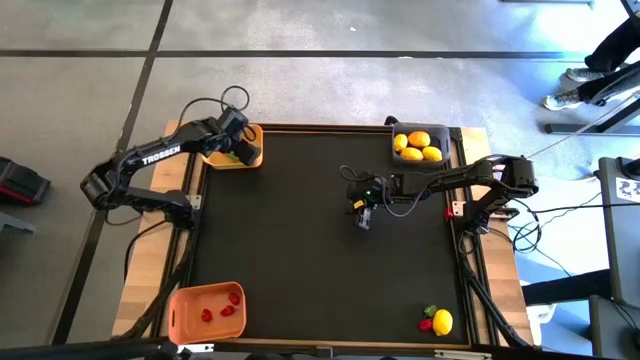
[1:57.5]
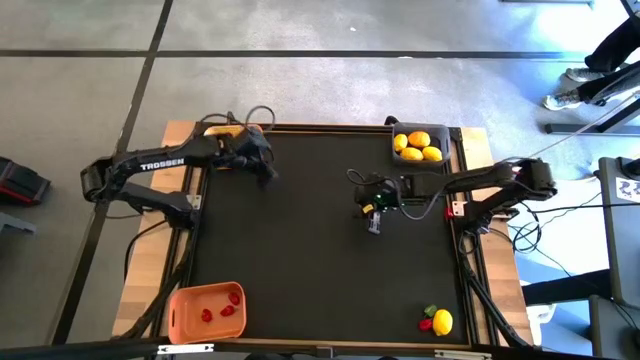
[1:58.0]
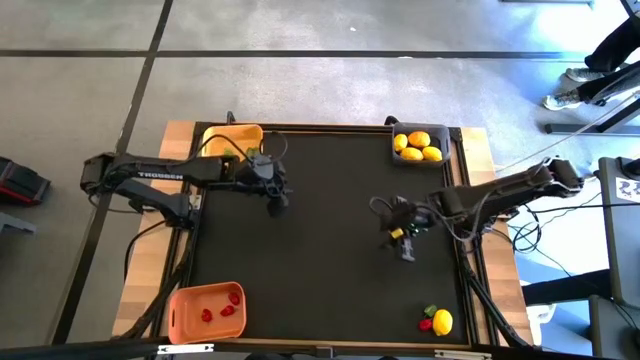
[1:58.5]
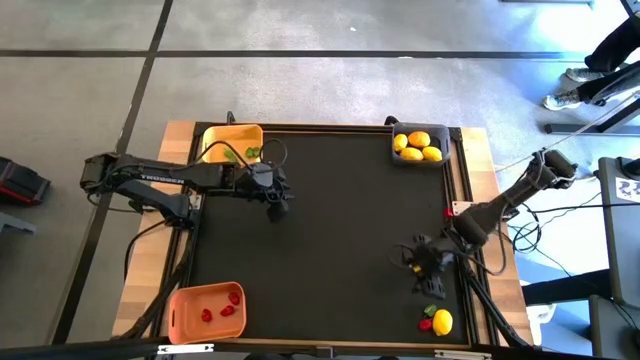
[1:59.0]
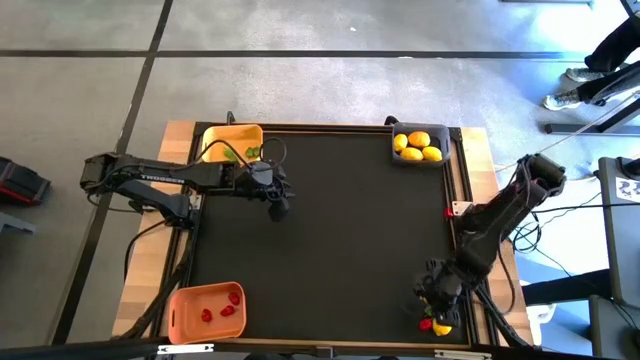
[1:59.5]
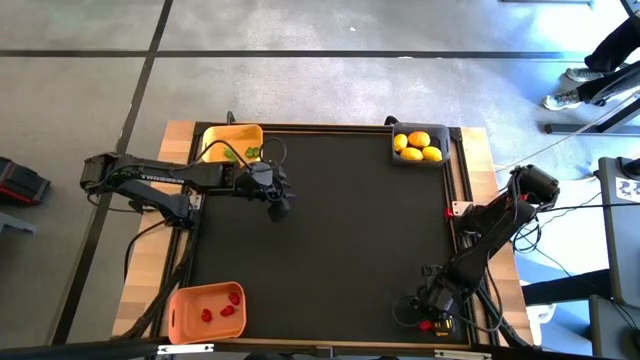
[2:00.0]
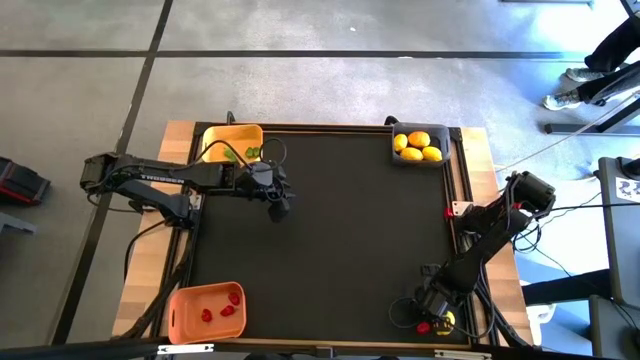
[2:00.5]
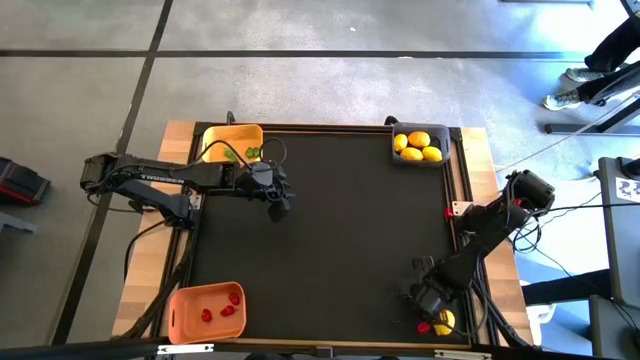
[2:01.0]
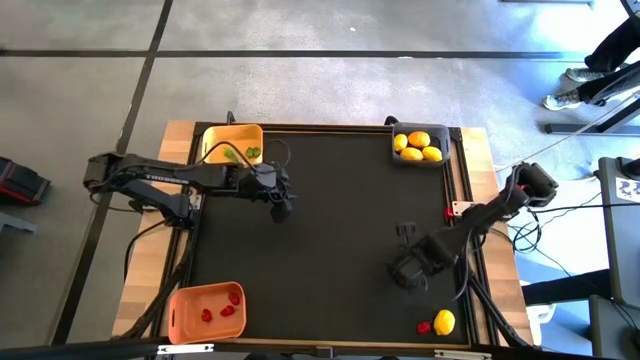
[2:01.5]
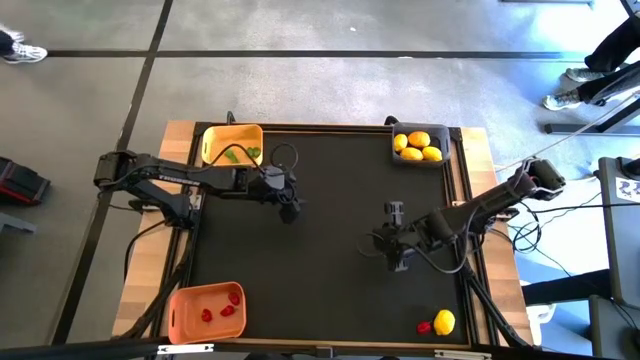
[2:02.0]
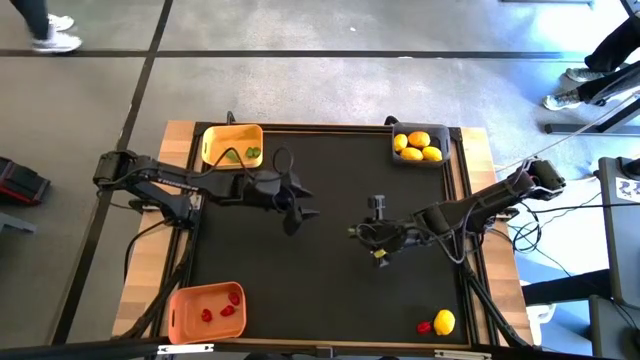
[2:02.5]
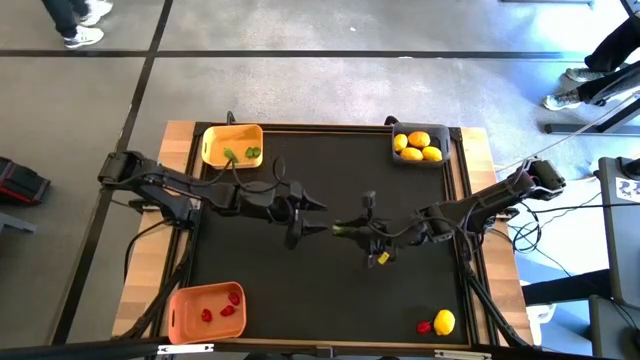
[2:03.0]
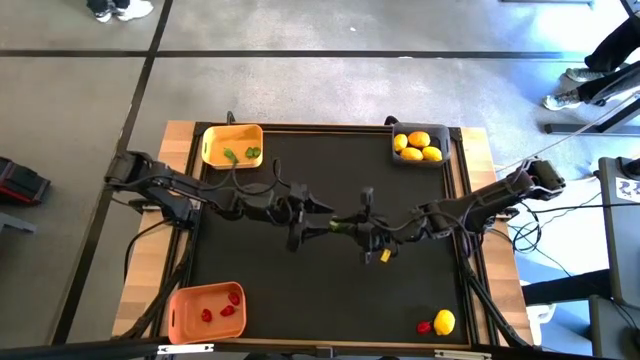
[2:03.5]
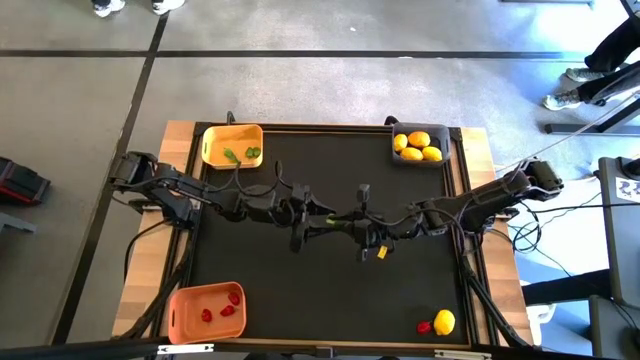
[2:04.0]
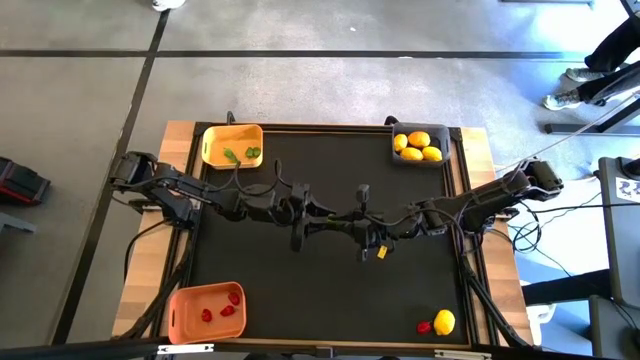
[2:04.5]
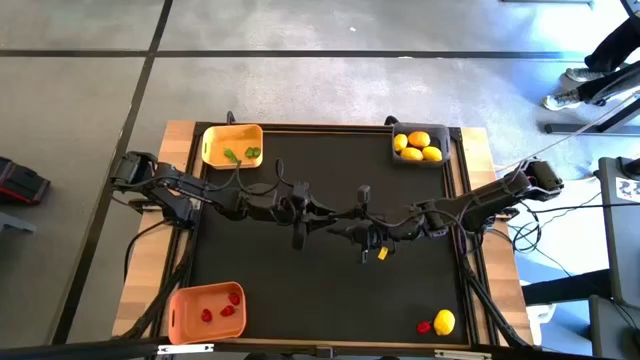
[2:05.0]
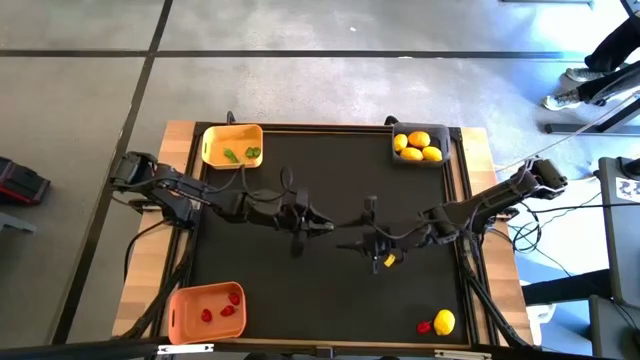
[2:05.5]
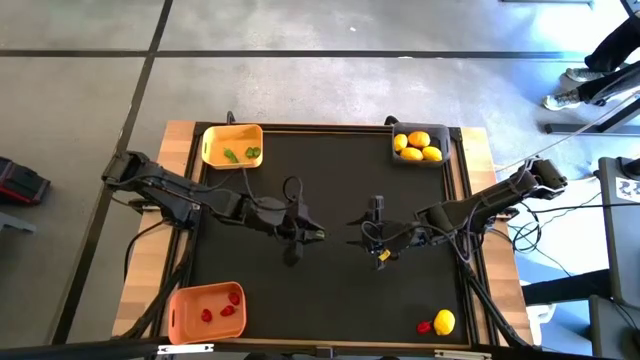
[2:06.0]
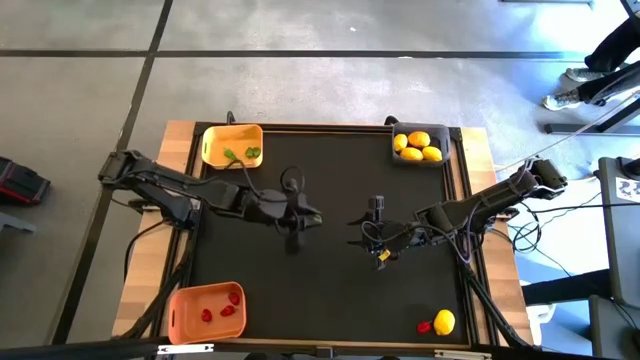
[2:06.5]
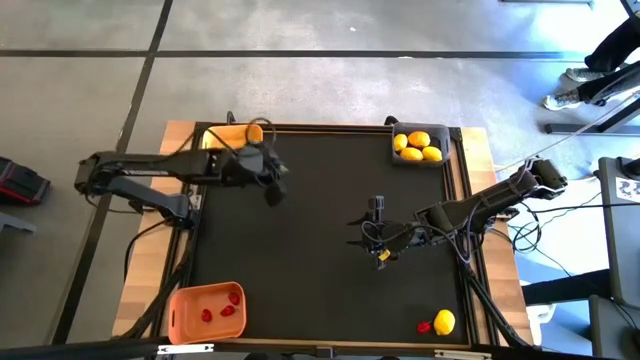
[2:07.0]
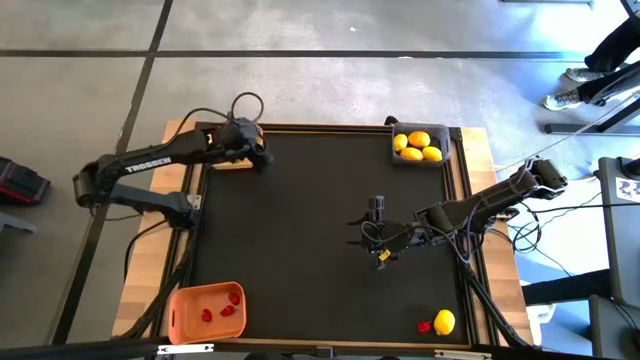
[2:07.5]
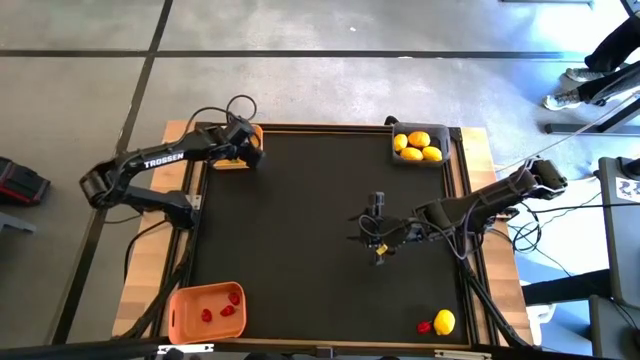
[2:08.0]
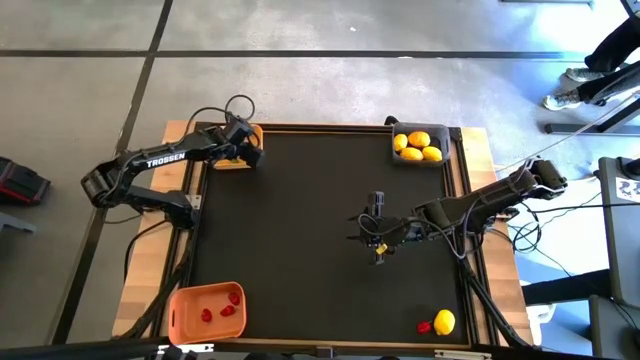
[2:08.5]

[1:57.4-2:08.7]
Task: Sort produce into baskets
Put the green bell pepper into the yellow bin

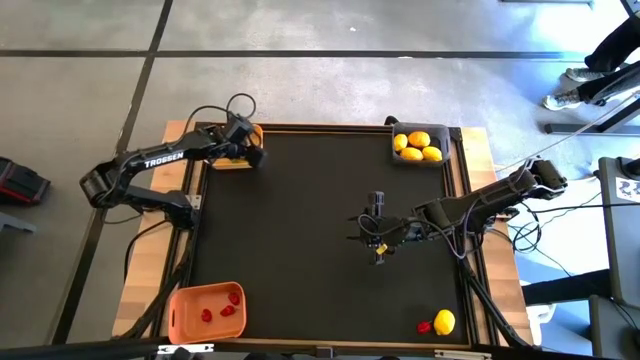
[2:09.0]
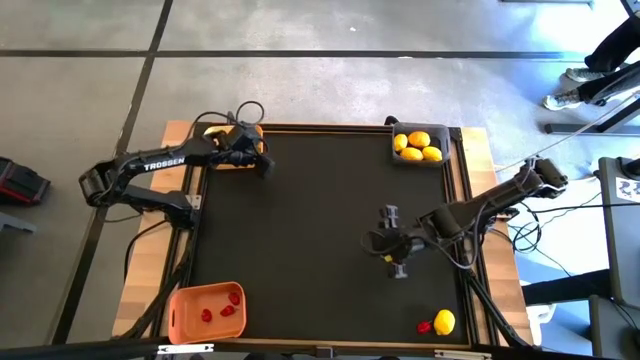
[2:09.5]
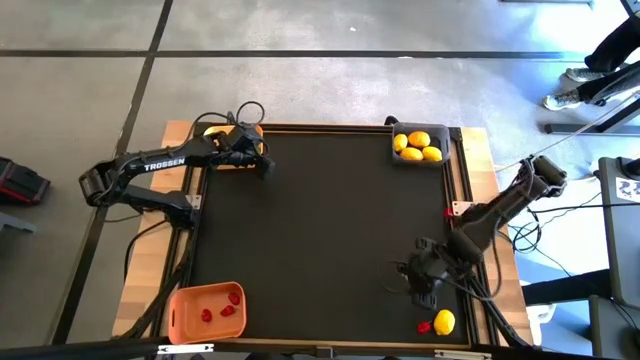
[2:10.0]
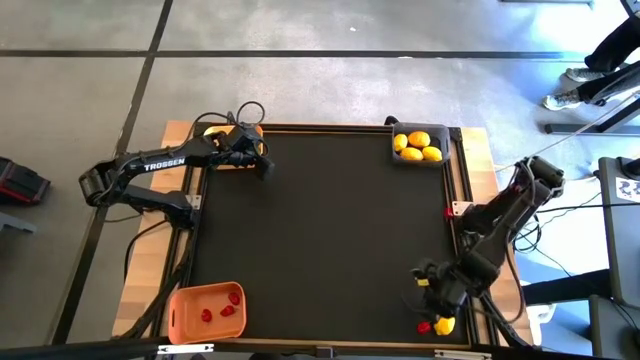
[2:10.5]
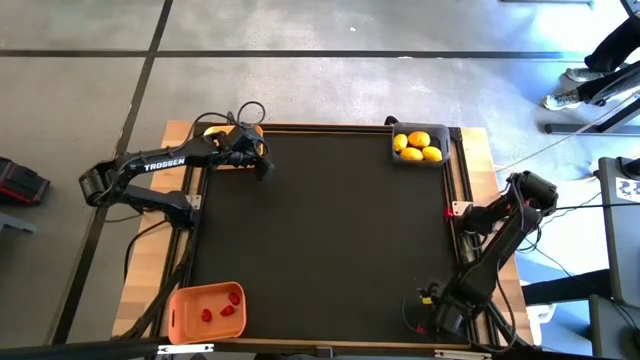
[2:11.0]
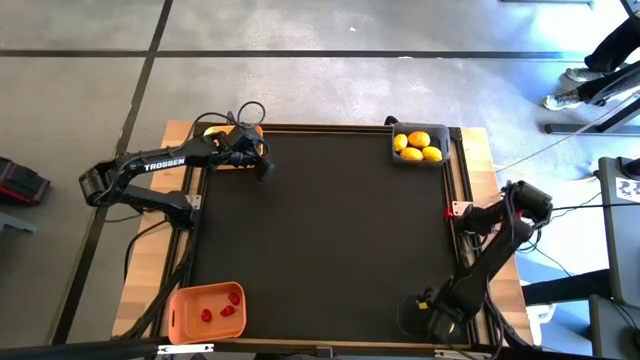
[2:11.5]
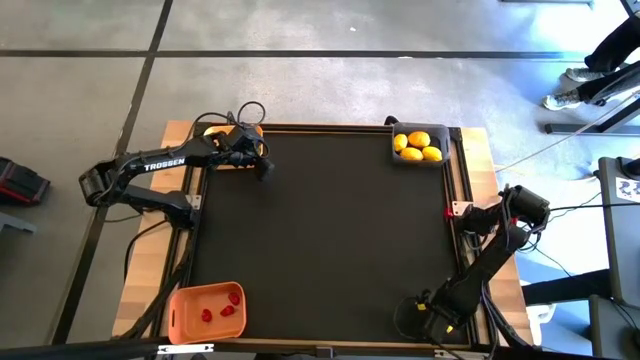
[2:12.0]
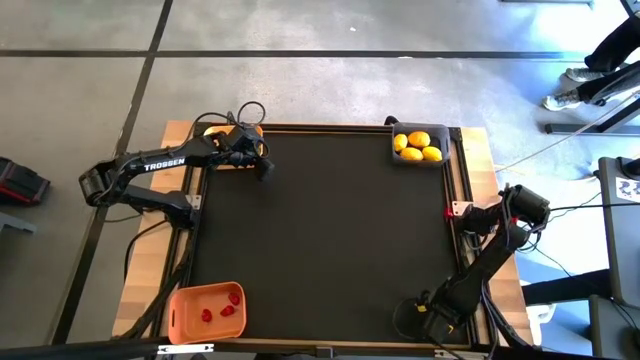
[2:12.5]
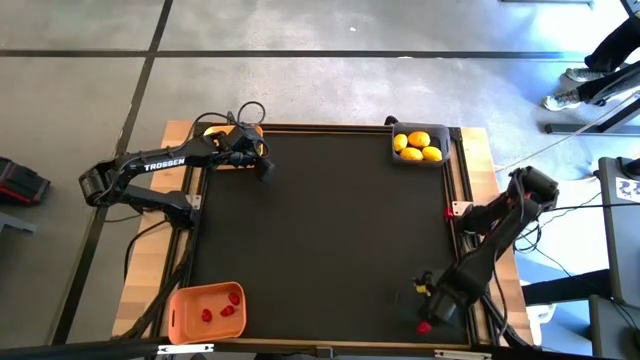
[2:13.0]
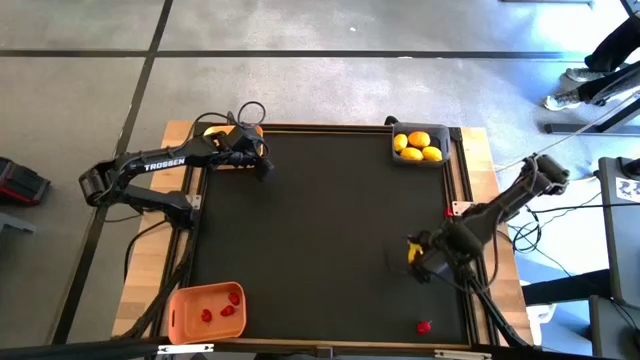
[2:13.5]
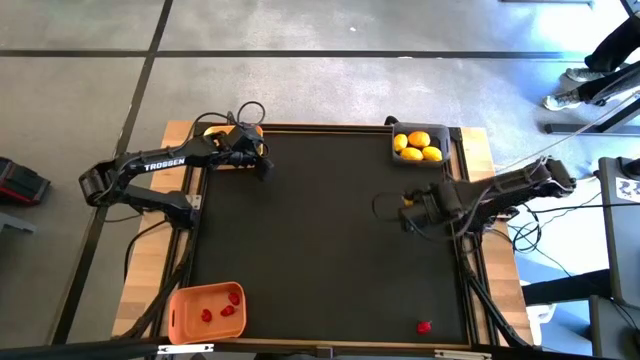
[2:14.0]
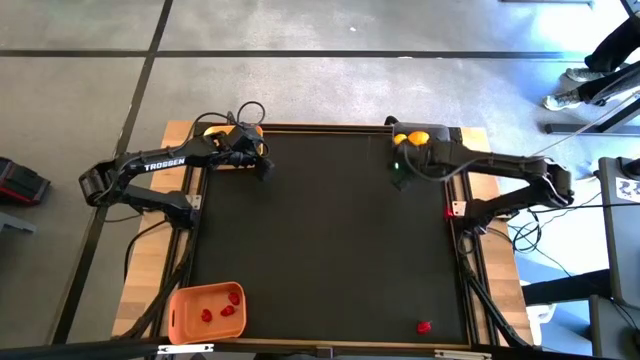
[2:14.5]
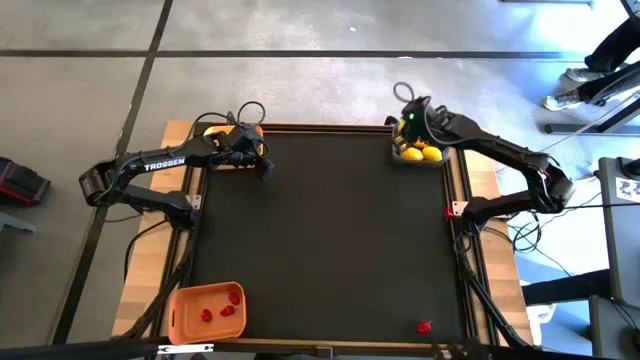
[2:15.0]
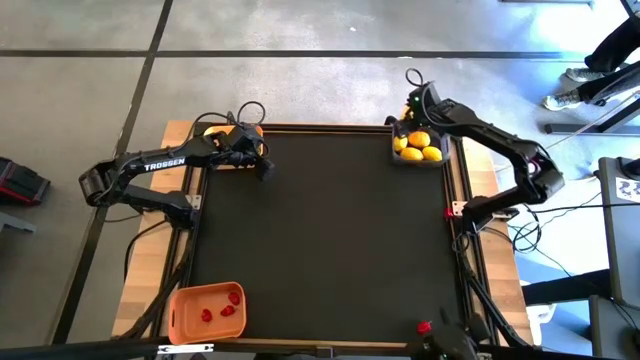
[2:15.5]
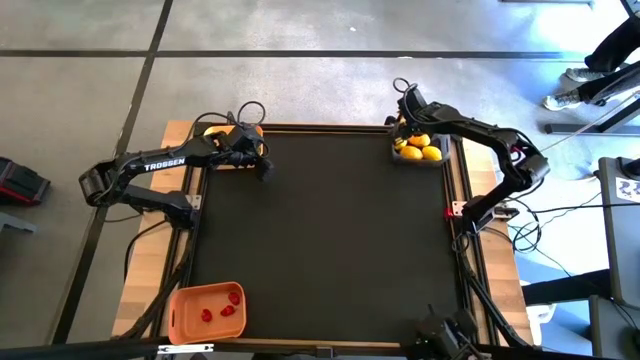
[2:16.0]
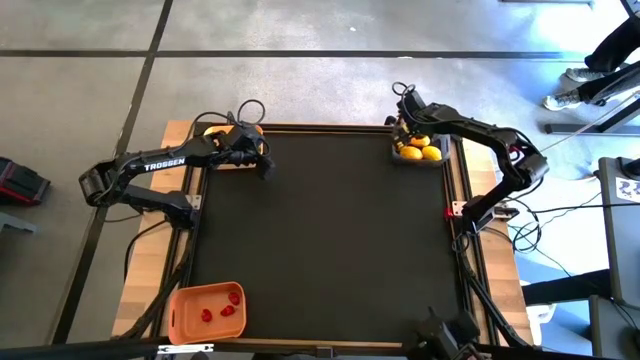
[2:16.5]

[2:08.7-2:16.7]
Put the yellow lemon into the black bin

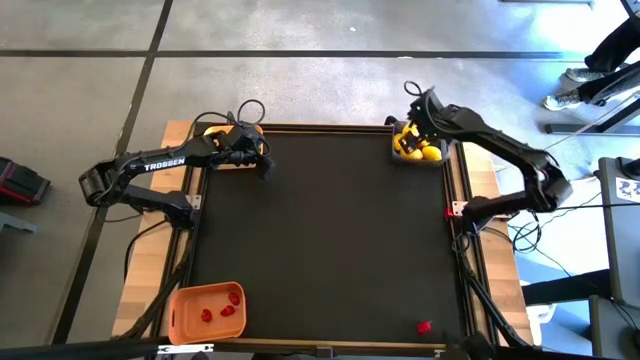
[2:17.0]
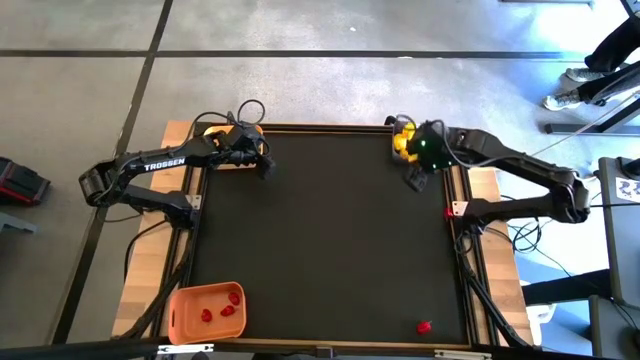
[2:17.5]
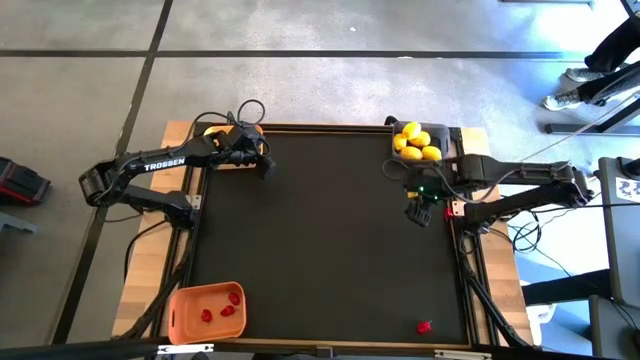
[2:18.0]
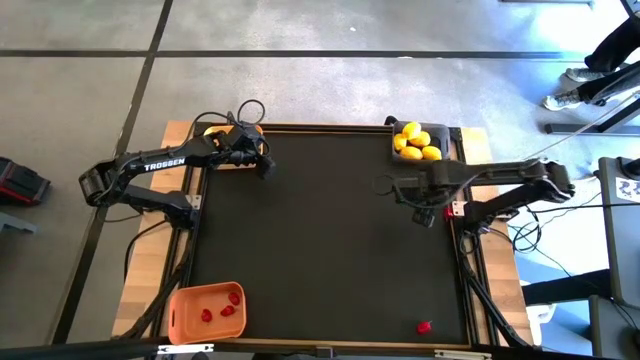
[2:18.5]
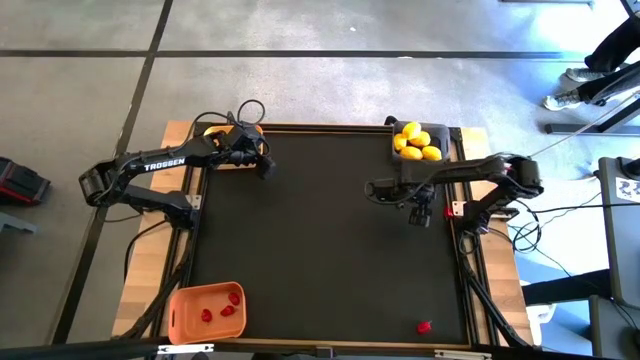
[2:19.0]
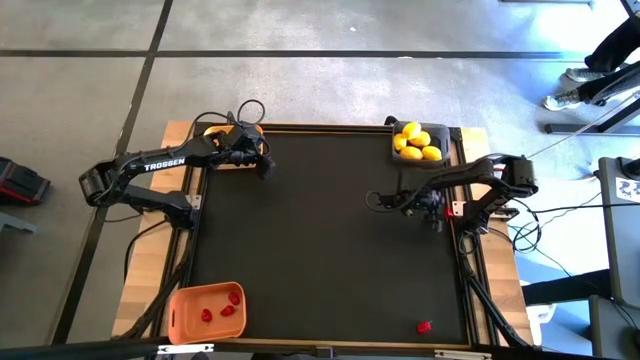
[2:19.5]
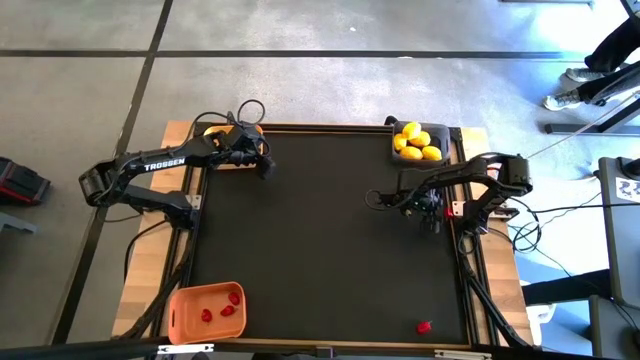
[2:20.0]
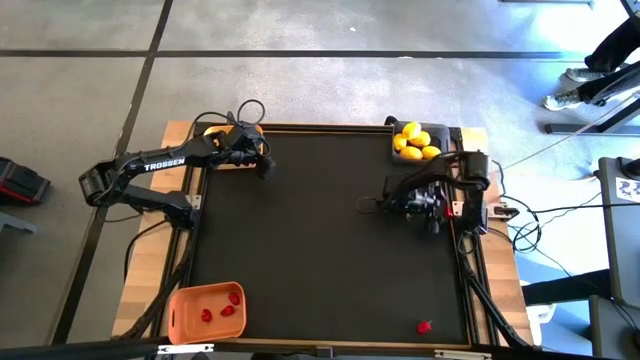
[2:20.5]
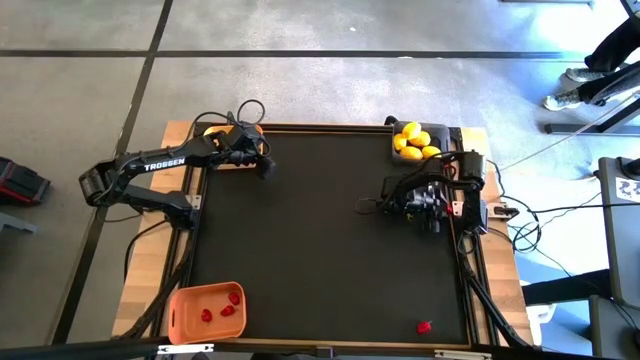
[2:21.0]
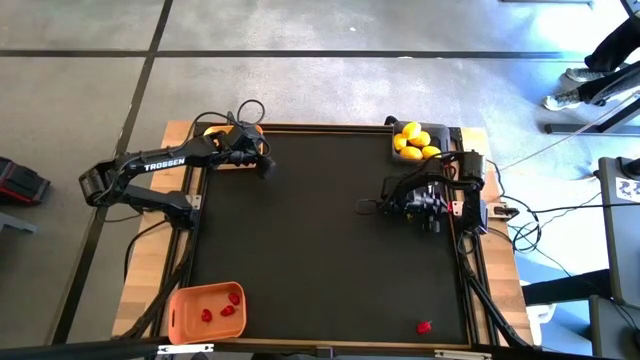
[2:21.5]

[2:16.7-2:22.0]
Put the red bell pepper into the orange bin
